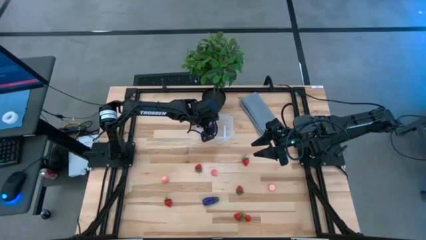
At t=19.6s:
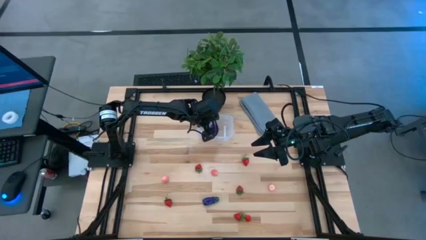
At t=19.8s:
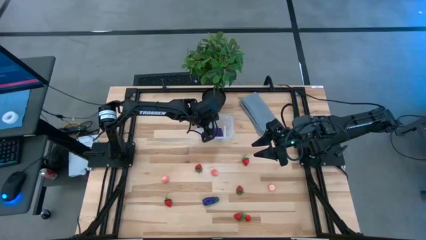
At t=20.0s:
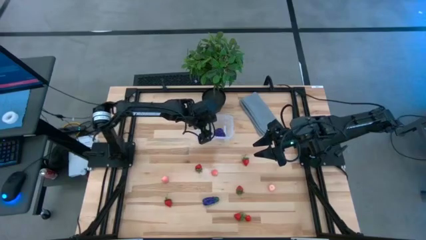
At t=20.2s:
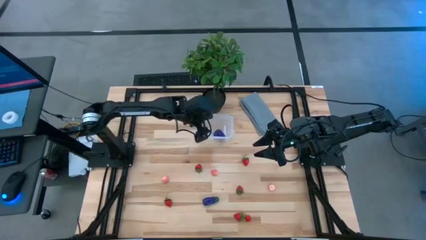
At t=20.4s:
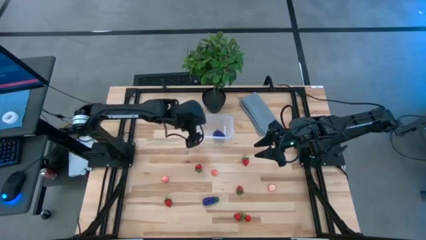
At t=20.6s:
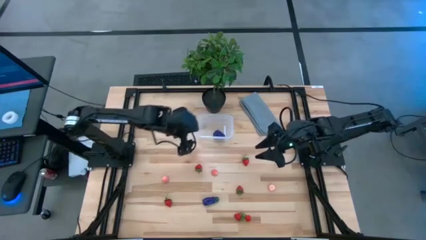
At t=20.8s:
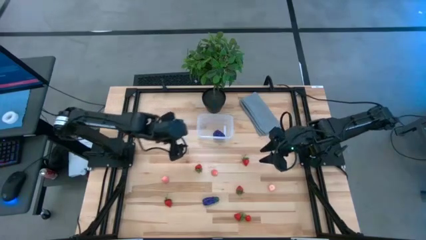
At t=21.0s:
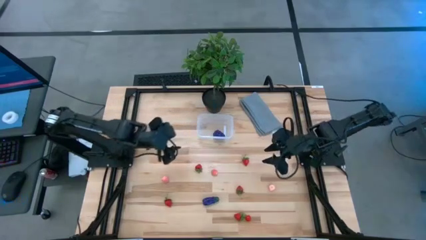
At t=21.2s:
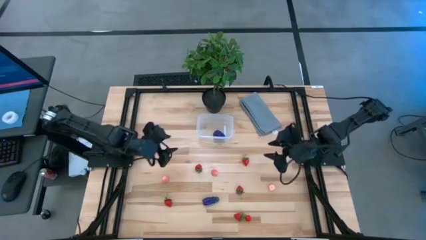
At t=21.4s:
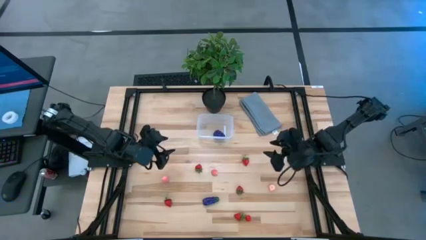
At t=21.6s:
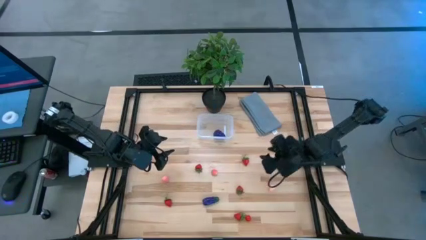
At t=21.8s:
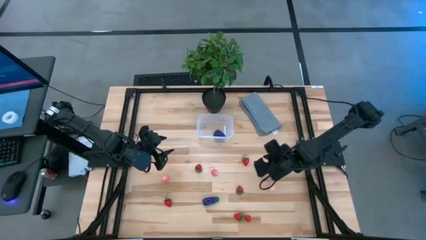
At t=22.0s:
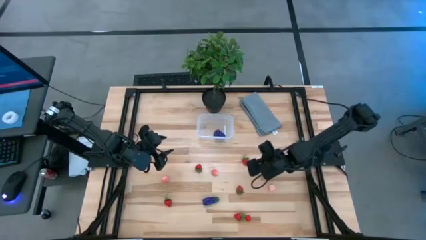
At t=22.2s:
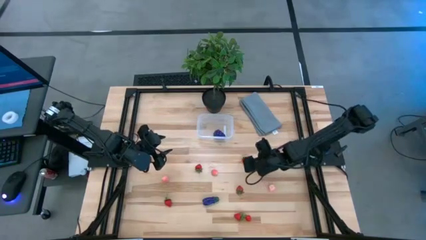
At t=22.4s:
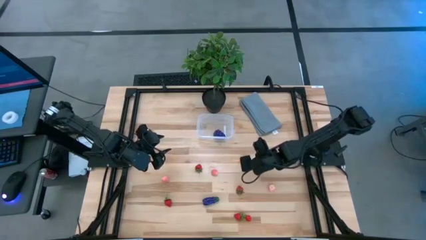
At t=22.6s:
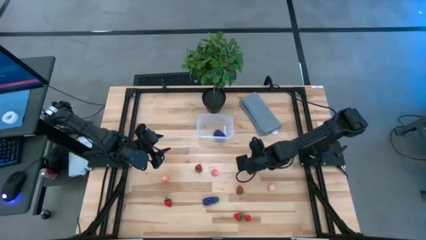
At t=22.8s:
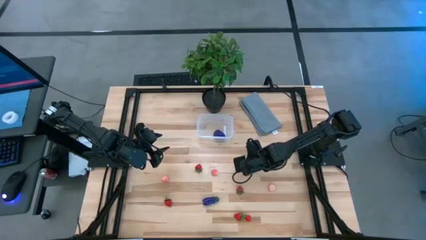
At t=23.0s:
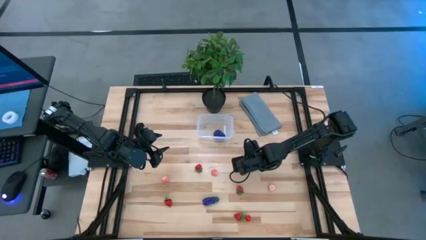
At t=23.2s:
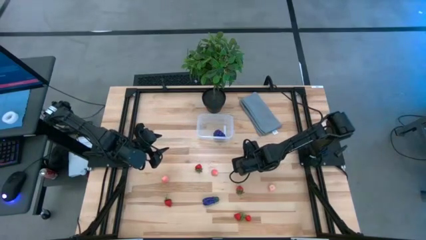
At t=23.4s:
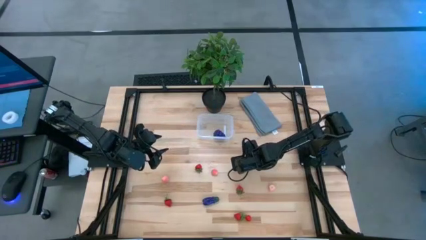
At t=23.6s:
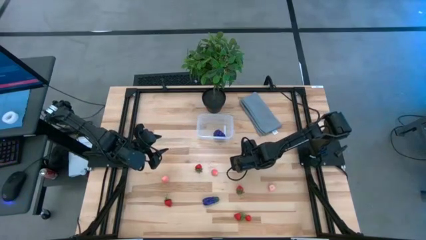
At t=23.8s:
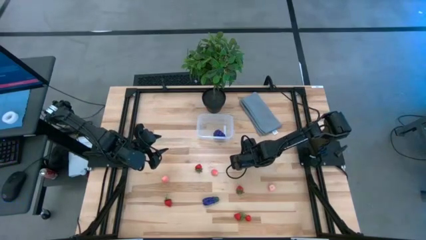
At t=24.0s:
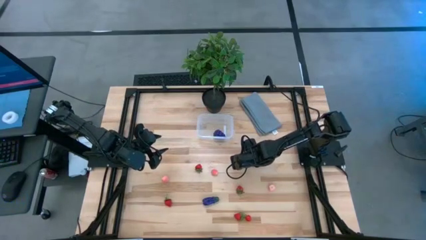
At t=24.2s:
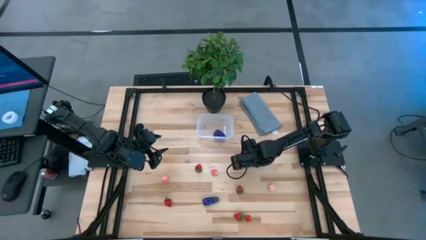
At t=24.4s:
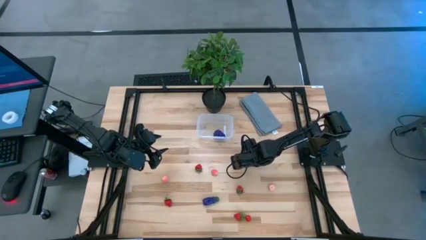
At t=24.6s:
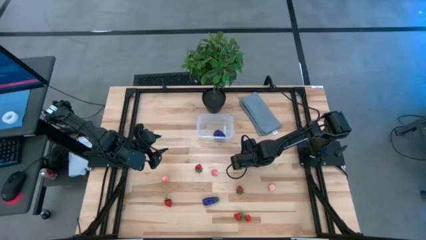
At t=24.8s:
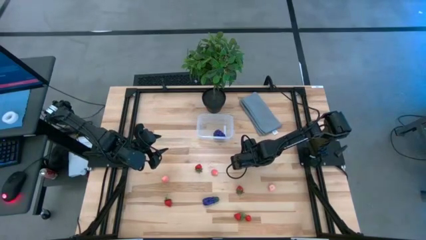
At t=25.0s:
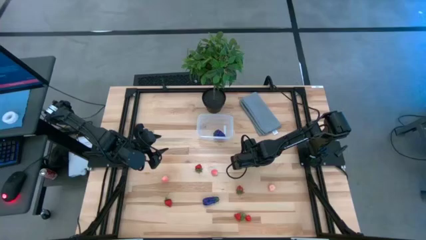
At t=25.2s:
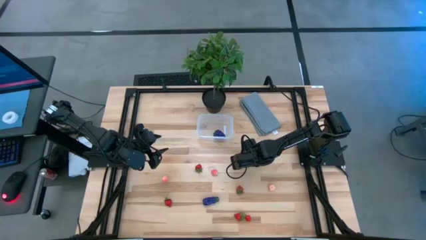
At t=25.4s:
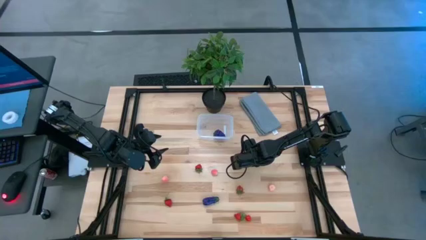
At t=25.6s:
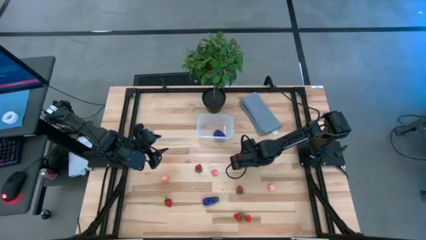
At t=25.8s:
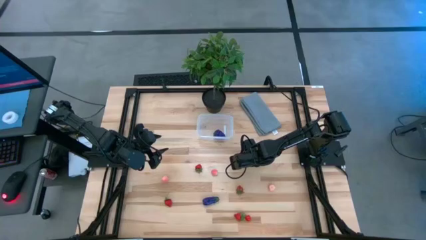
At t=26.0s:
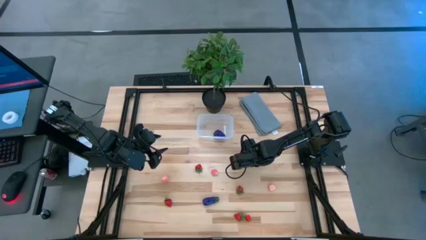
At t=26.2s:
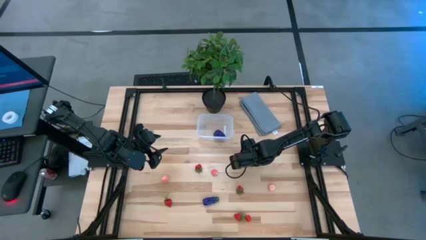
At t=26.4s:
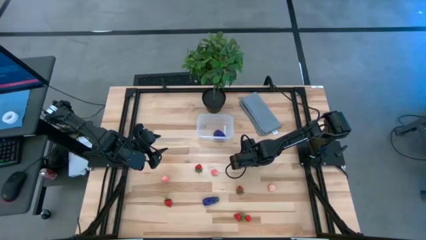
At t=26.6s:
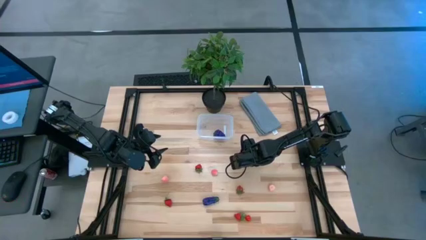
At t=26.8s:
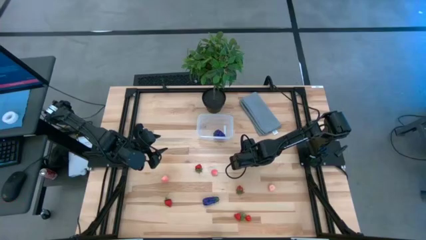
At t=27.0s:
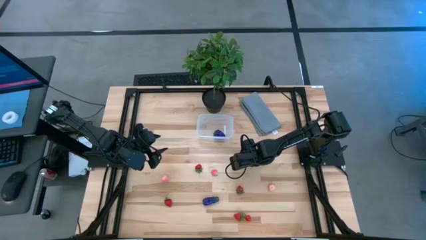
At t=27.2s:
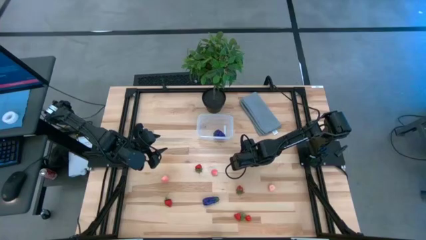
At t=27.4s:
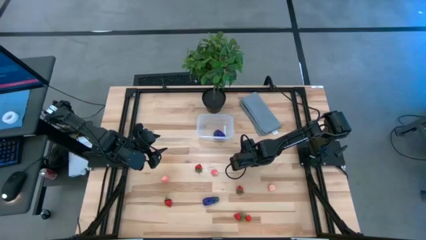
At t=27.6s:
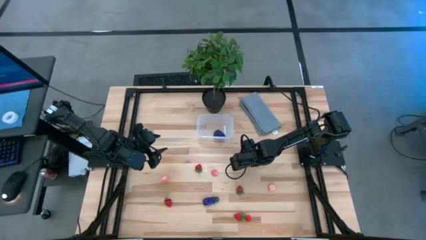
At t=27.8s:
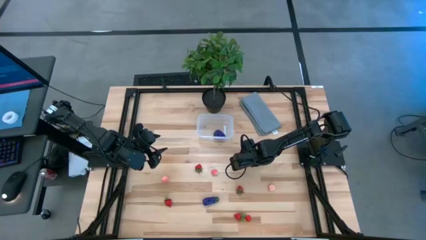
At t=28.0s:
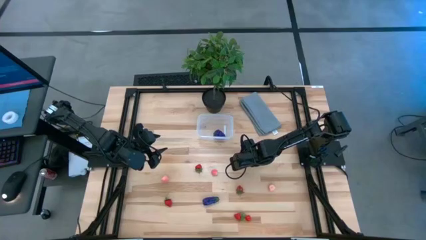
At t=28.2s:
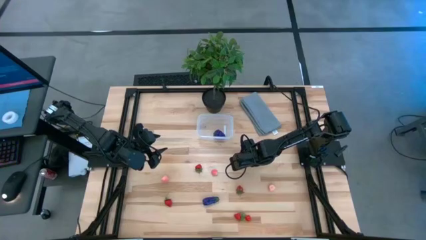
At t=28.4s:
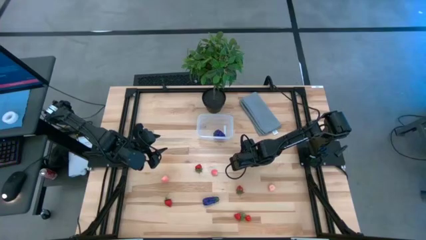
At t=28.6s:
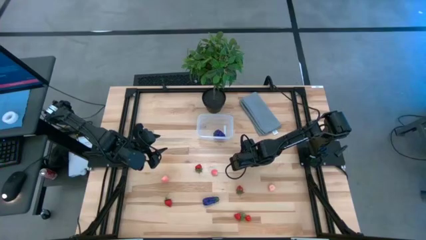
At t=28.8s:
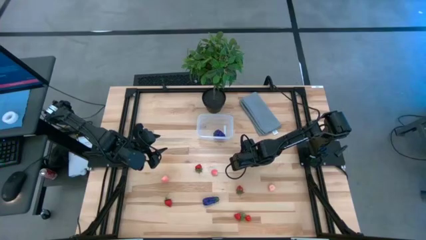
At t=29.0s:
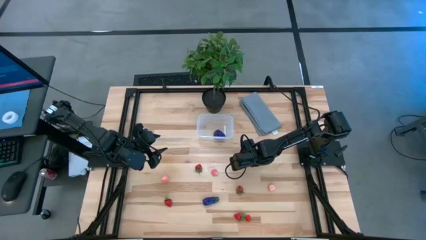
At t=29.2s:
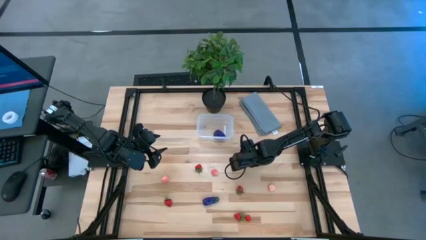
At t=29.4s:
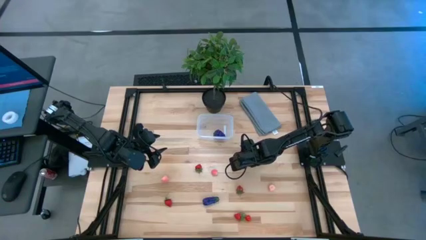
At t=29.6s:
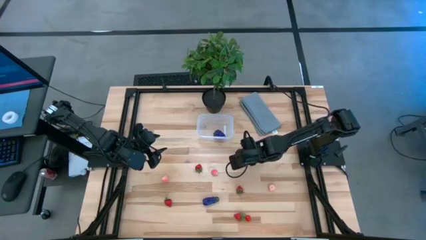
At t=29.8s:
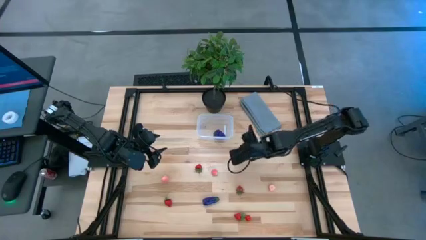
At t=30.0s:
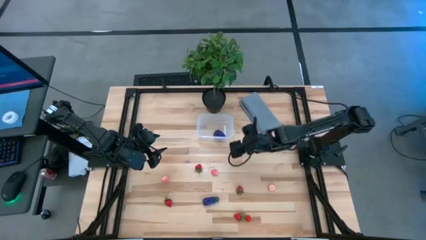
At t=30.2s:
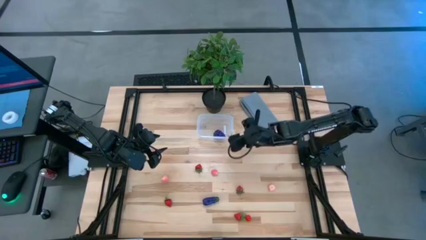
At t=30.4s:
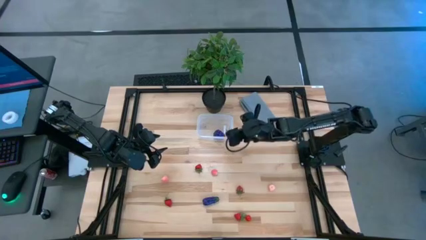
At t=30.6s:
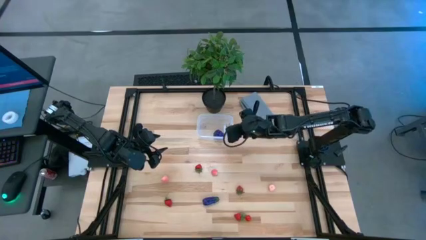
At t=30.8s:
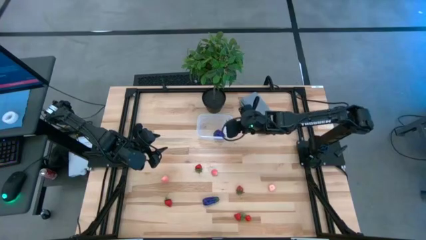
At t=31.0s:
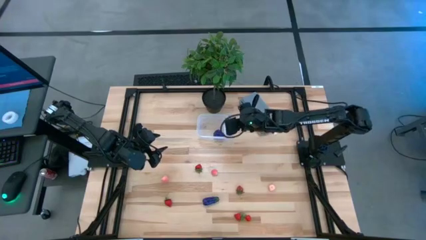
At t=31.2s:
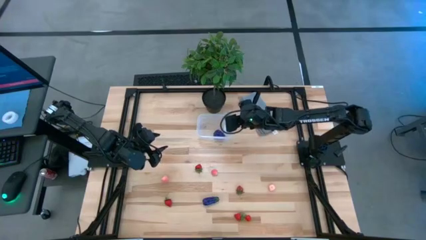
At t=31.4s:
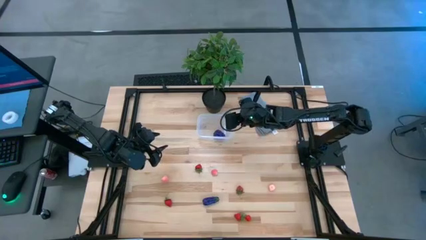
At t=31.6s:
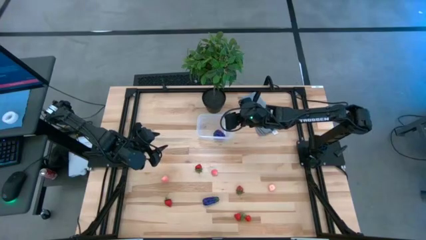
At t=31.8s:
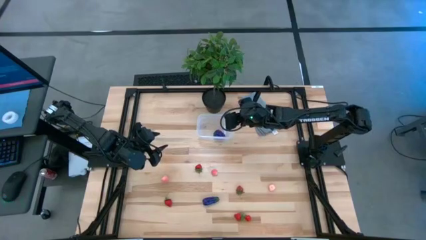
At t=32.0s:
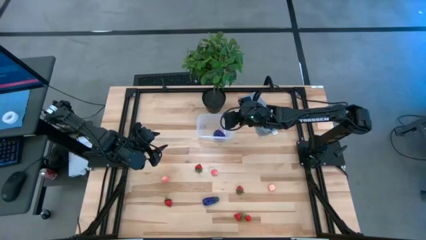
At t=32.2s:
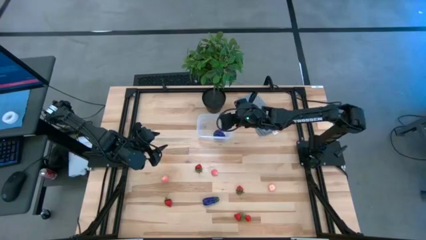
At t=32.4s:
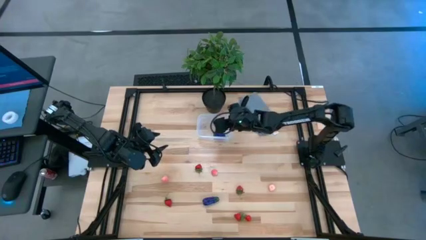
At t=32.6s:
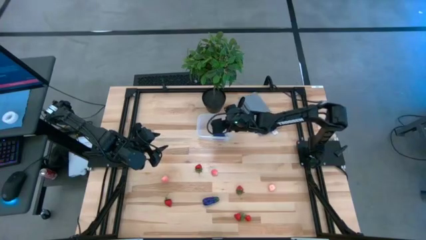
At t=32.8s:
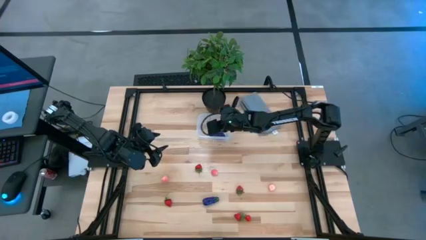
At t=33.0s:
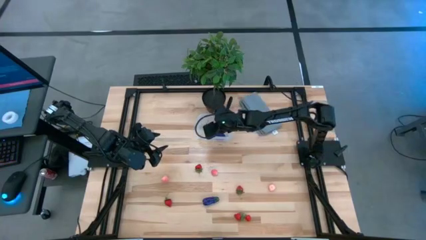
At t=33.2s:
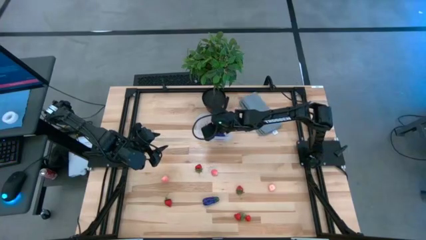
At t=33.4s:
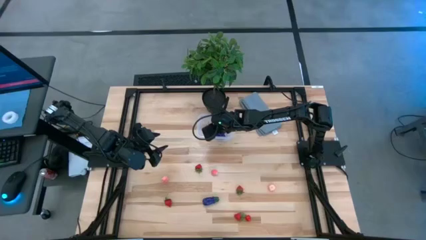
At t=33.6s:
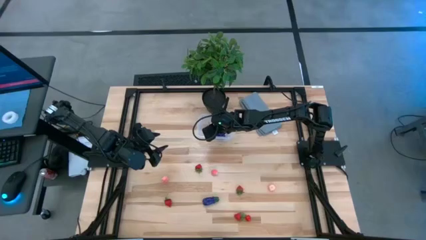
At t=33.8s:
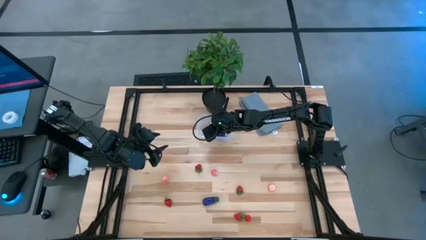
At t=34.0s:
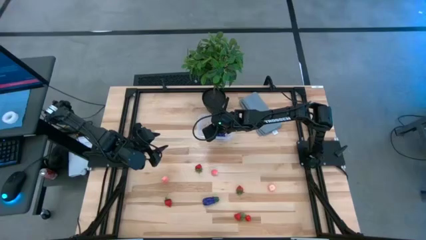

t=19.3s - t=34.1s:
Task: Pick and placing Produce into tupperware
Put the red strawberry into the transparent bin
